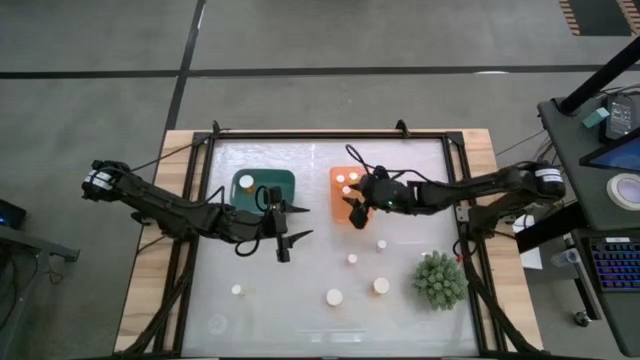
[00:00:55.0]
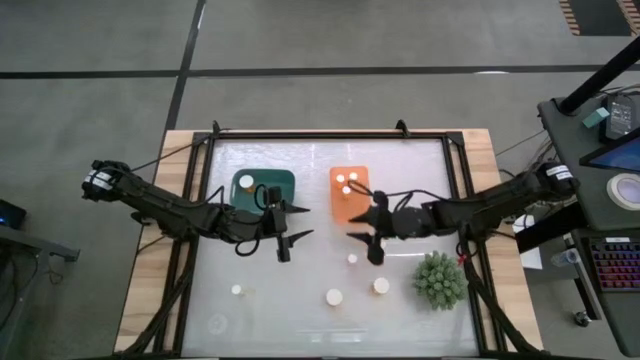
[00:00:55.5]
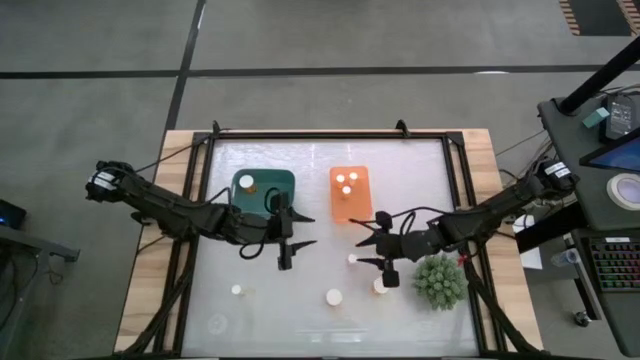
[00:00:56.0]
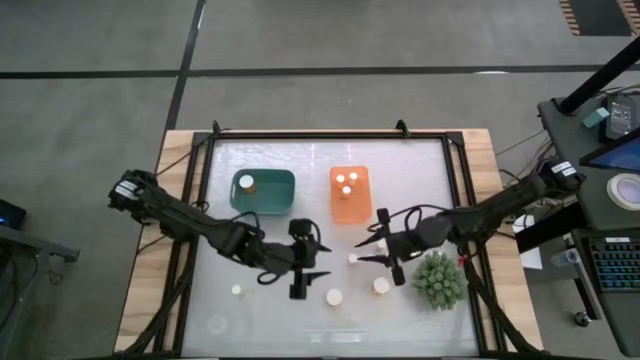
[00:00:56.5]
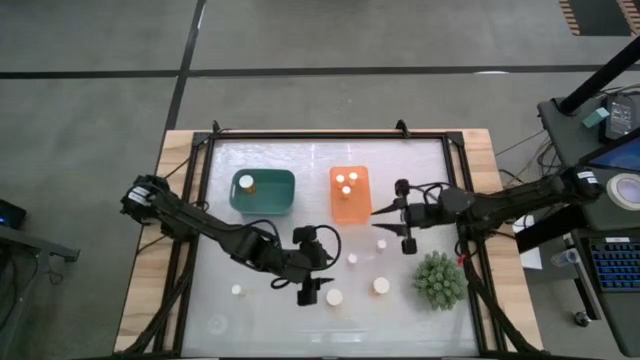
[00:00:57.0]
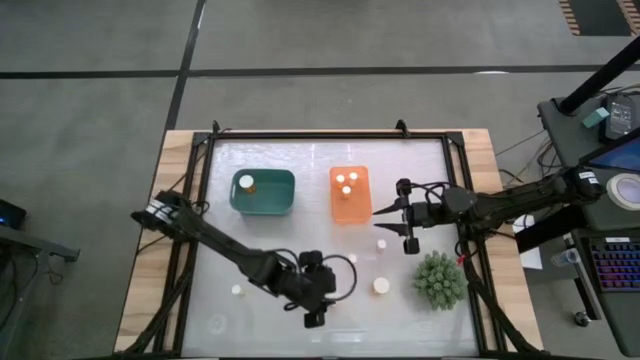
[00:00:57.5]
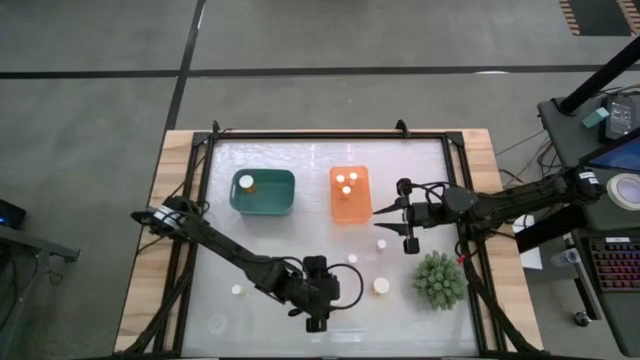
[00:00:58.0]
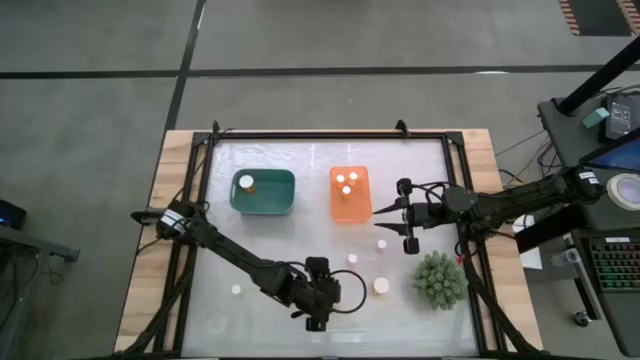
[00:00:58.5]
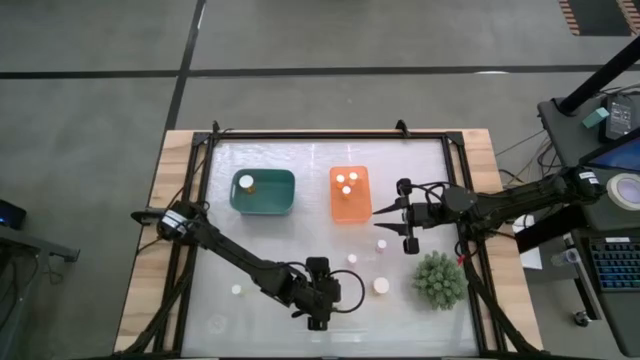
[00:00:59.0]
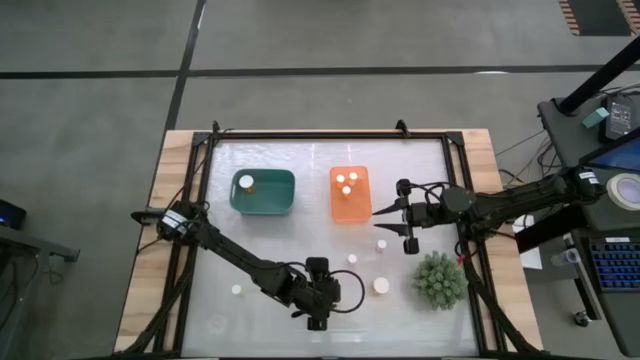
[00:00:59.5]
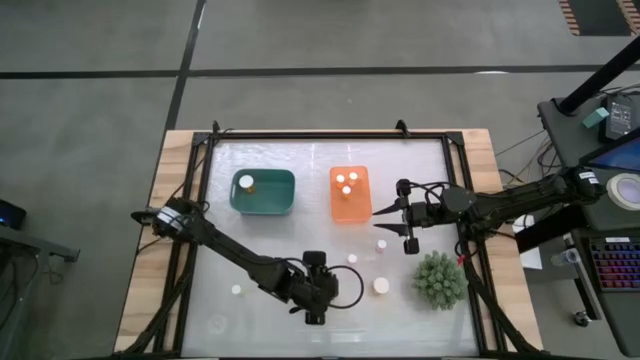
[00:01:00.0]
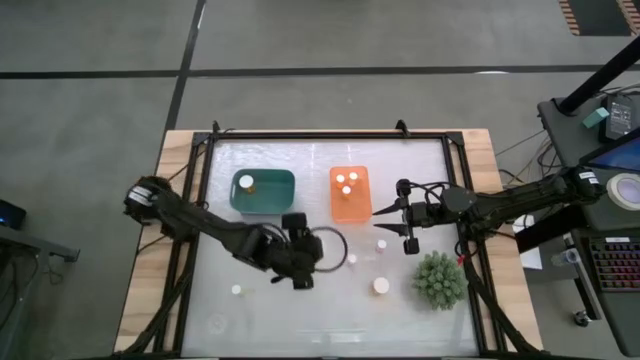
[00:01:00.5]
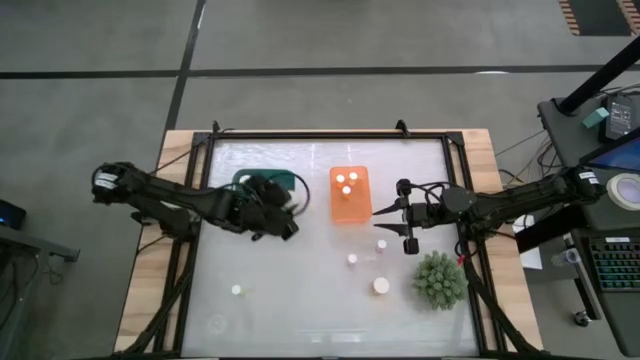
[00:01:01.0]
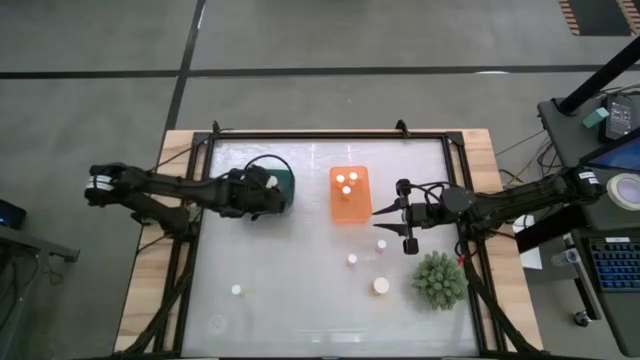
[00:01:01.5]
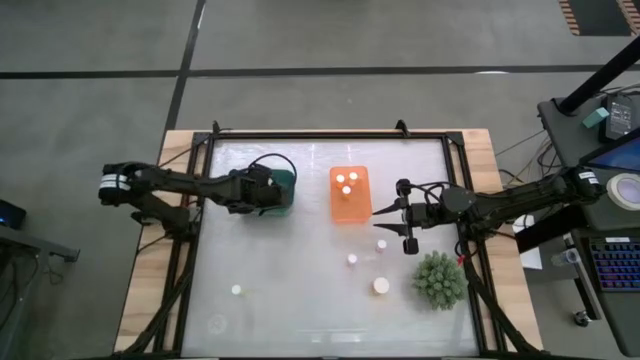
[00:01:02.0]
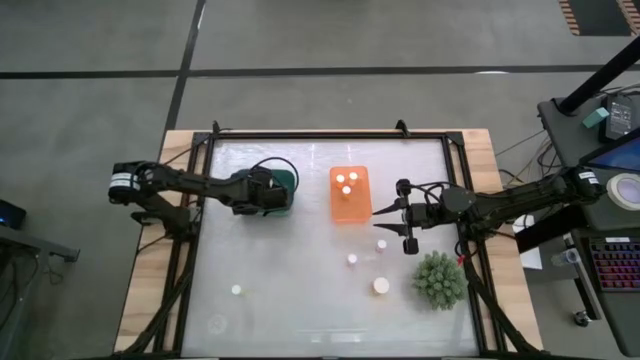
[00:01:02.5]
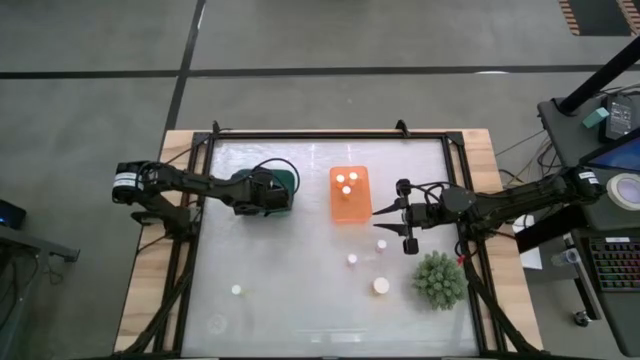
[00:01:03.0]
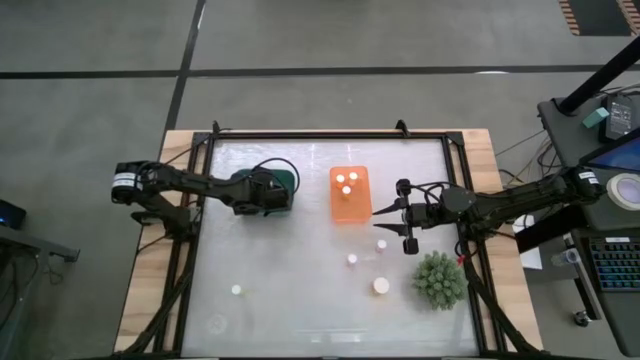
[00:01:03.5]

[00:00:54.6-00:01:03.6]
Task: Pick and place medicine bottles into bin by pill shape (circle, oval)
Put the left large orange pill bottle into the green bin

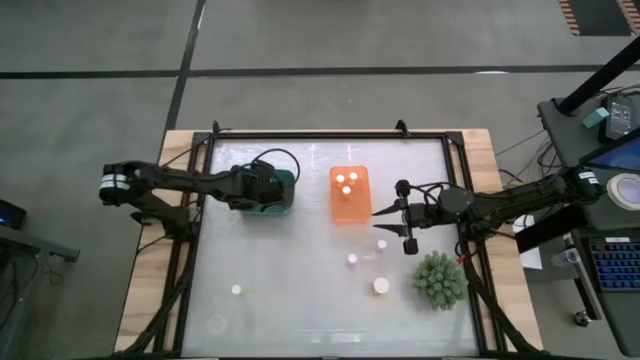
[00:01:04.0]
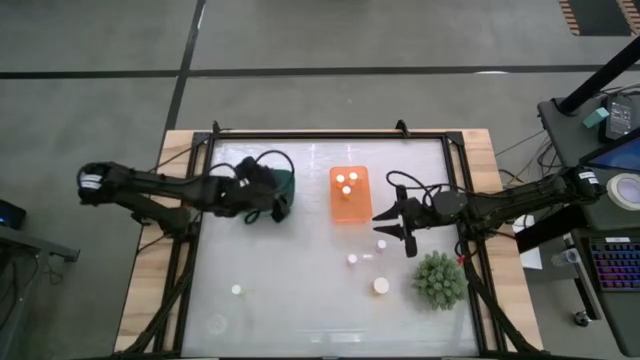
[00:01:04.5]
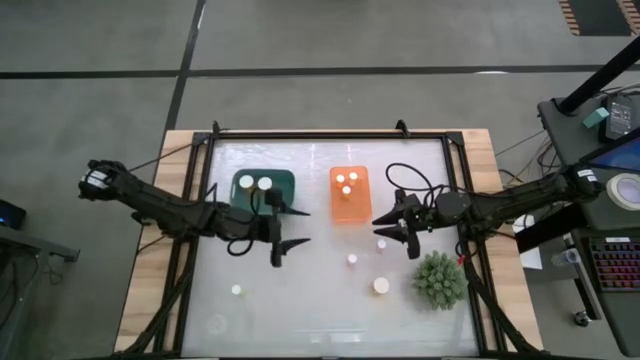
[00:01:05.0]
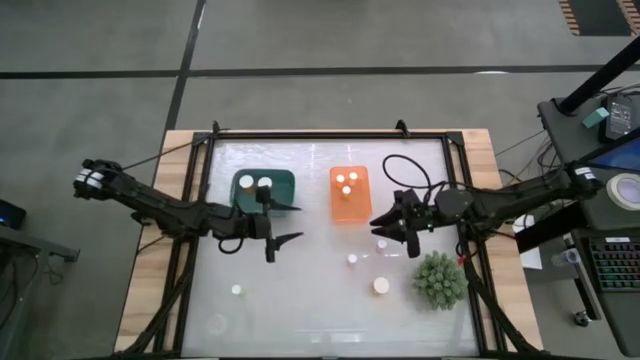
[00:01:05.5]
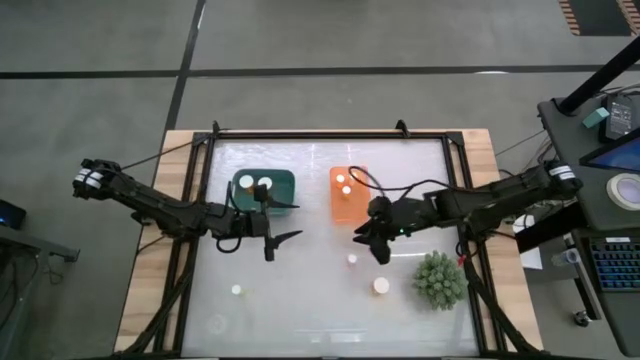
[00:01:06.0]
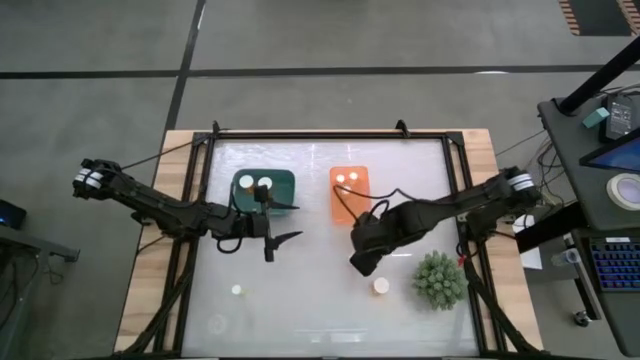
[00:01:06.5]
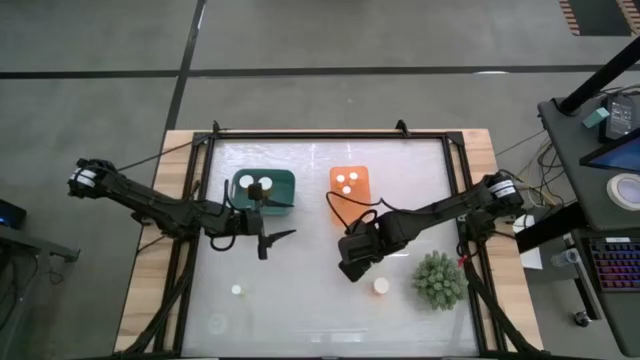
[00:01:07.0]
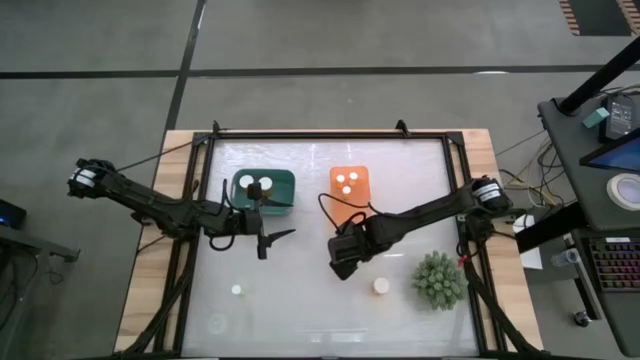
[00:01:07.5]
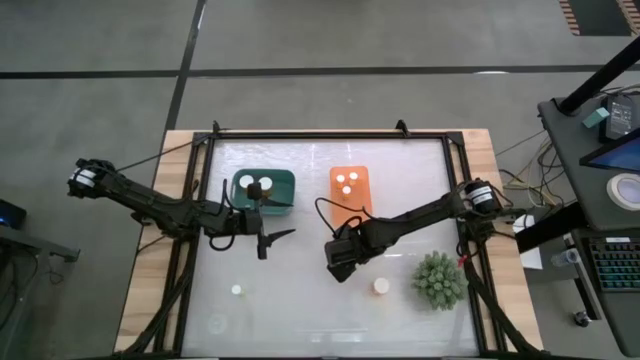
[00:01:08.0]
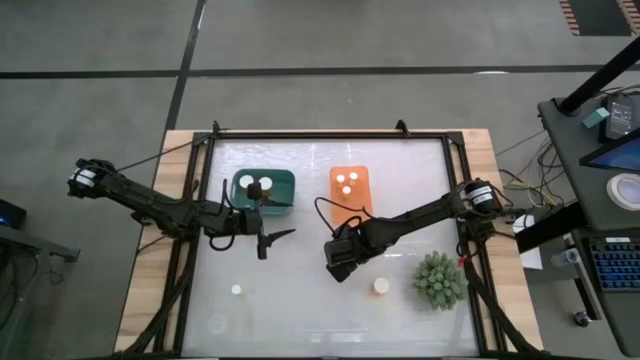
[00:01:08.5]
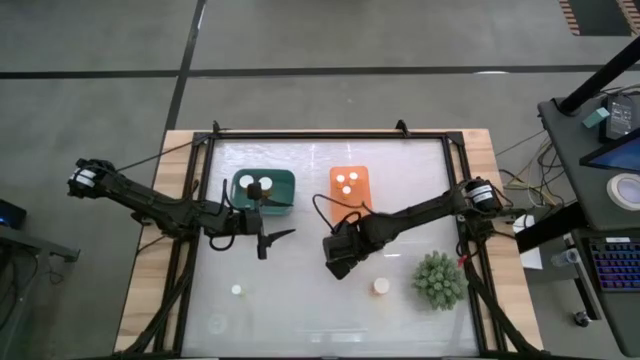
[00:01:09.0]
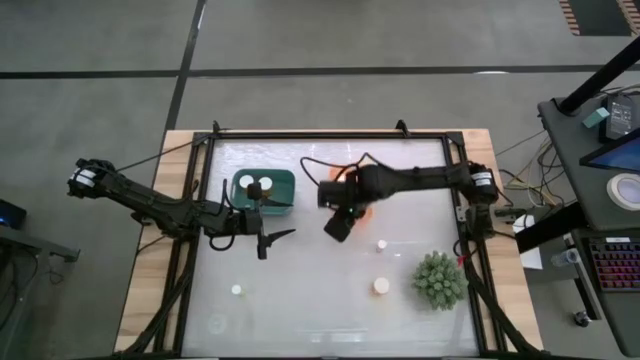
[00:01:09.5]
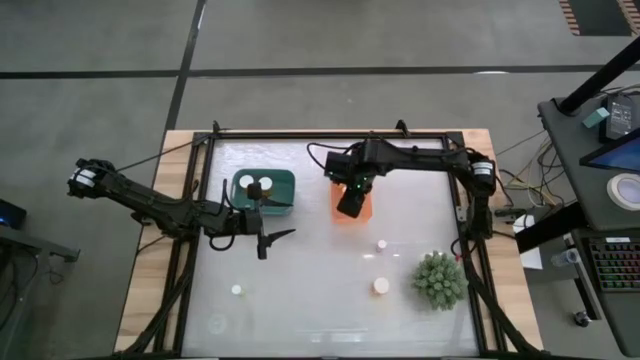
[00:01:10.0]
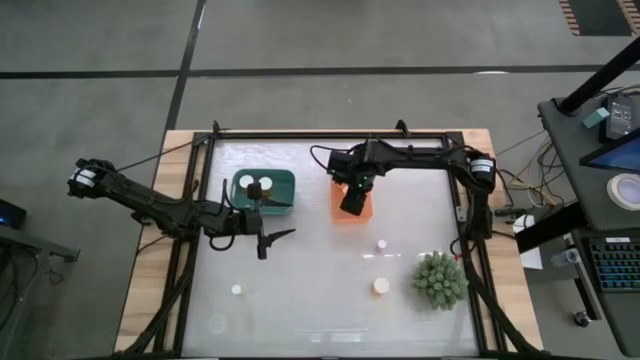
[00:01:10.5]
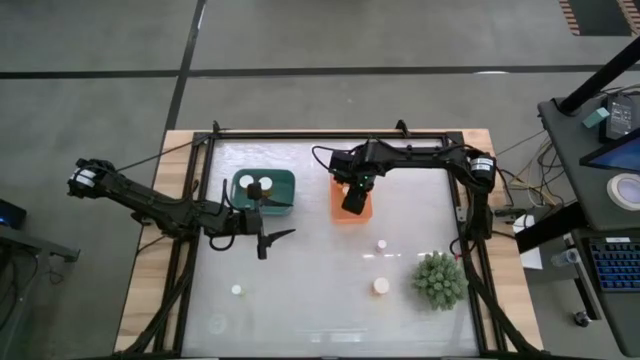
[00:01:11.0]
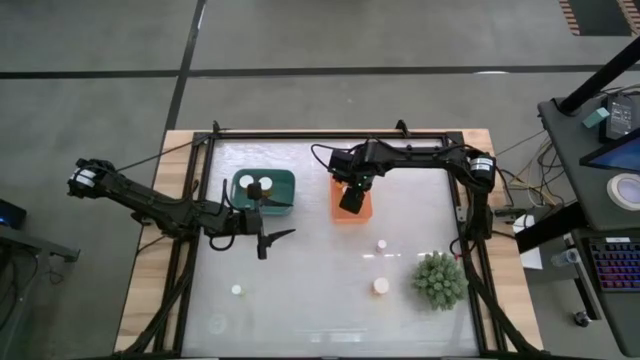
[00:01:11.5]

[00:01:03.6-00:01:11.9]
Put the left small pink pill bottle into the orange bin

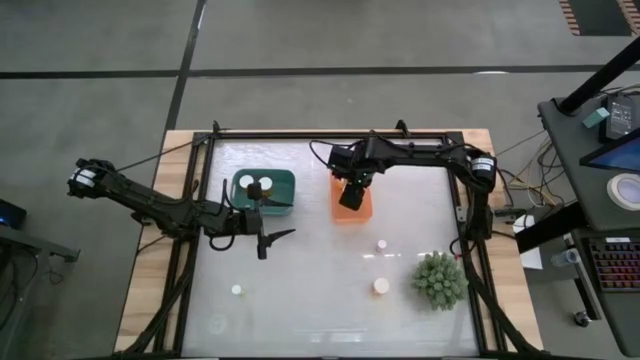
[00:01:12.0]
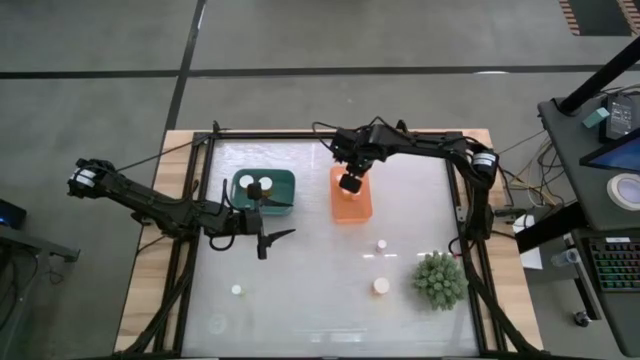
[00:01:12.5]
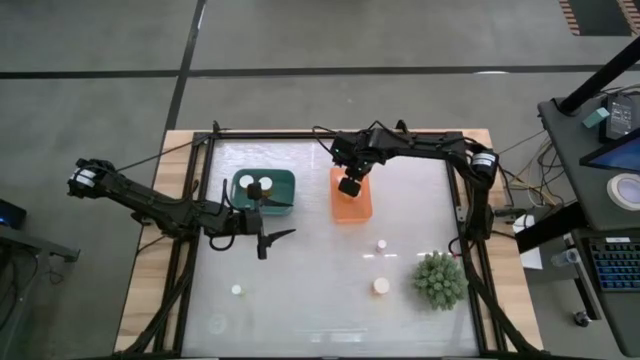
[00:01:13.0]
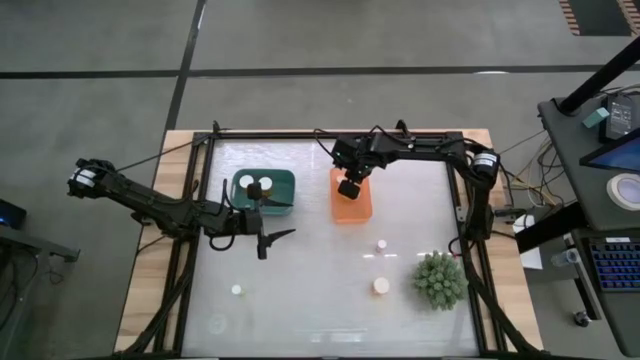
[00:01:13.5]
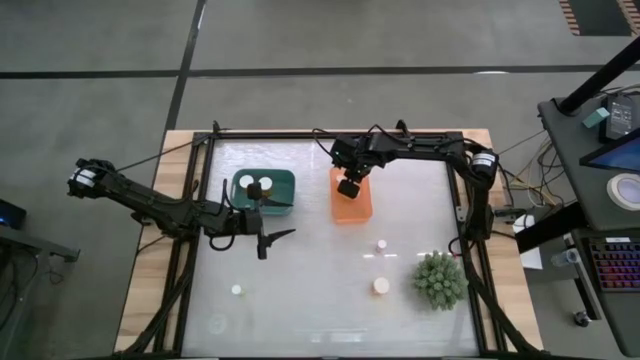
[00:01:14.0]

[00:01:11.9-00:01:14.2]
Adjust the small yellow pill bottle on the orange bin
